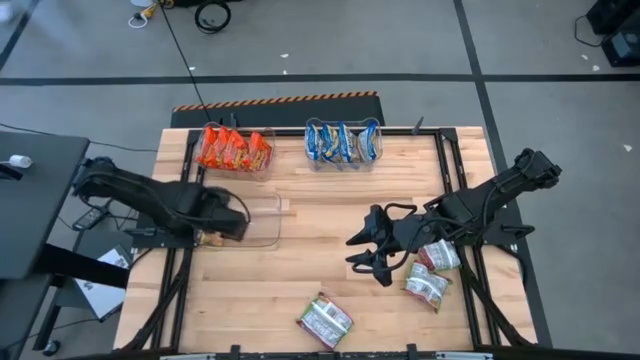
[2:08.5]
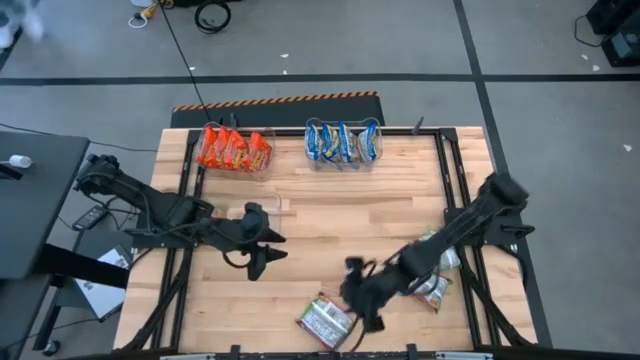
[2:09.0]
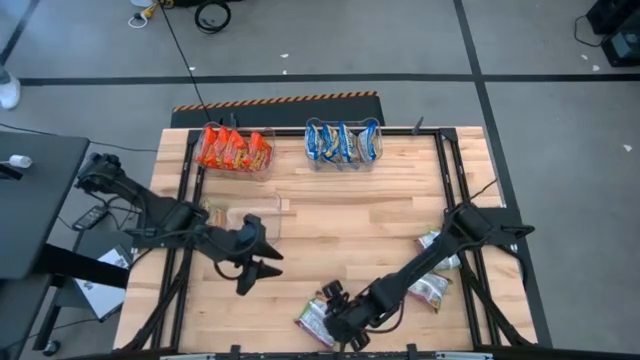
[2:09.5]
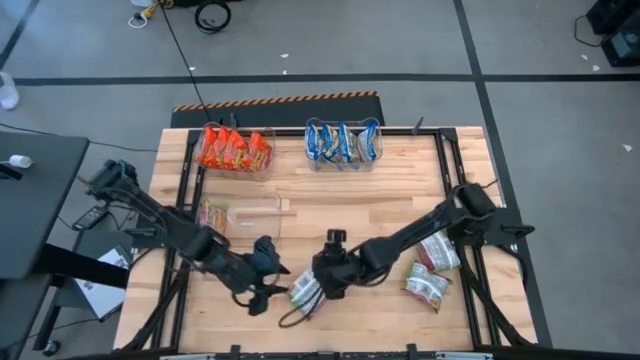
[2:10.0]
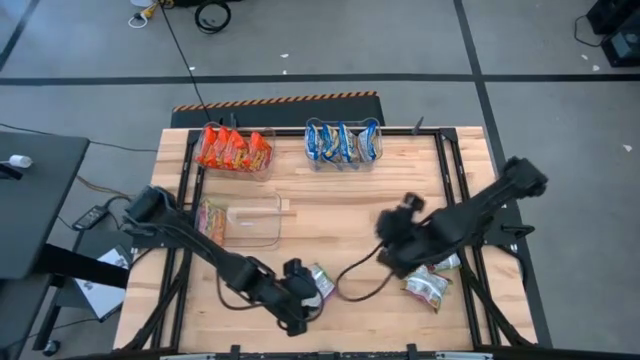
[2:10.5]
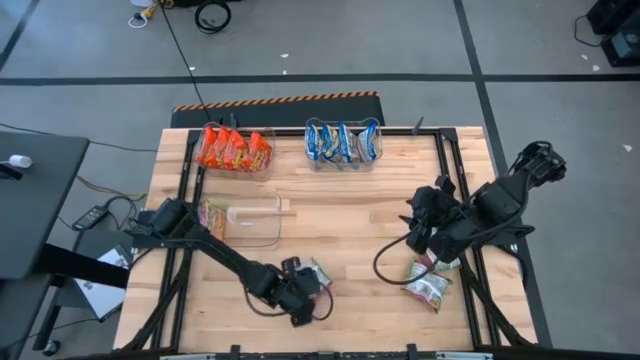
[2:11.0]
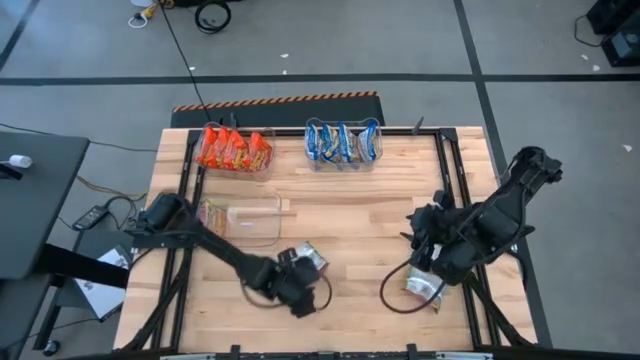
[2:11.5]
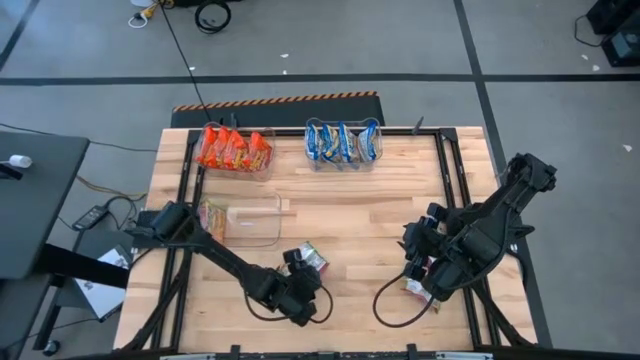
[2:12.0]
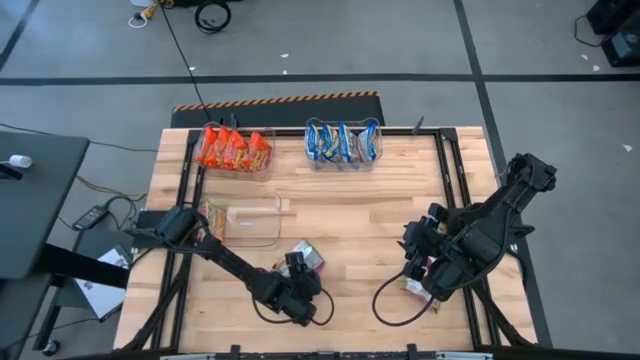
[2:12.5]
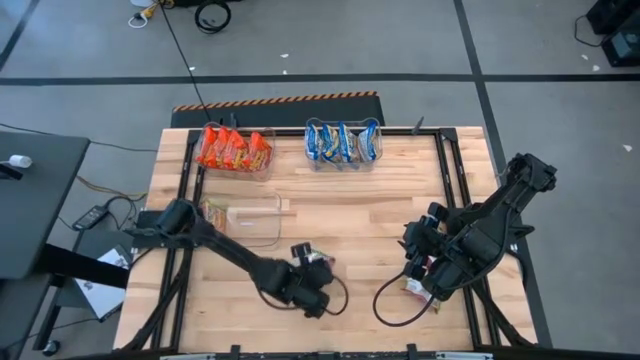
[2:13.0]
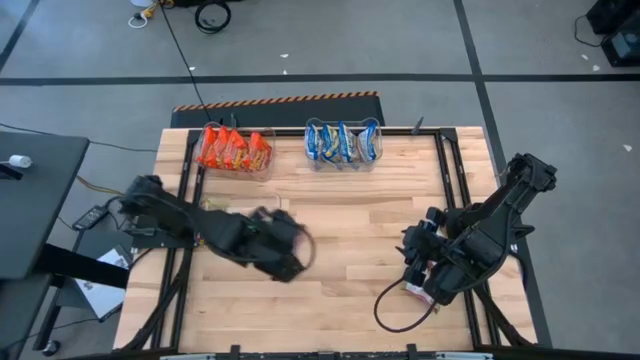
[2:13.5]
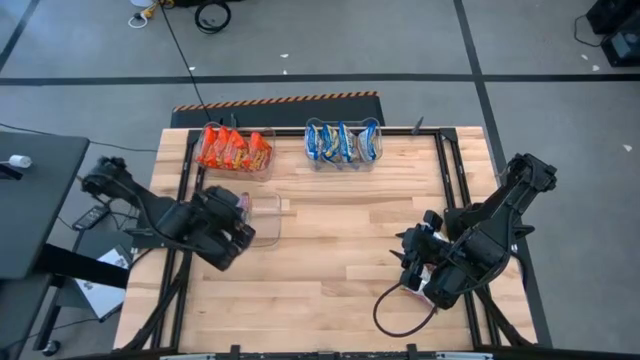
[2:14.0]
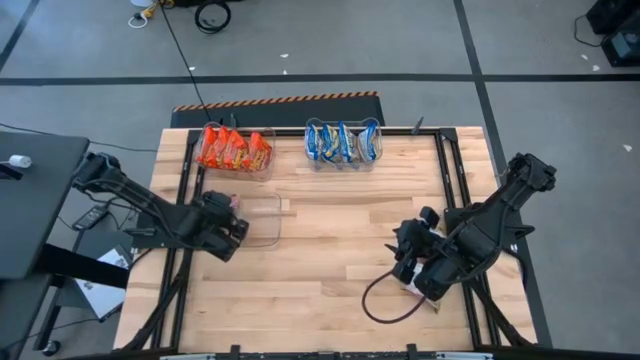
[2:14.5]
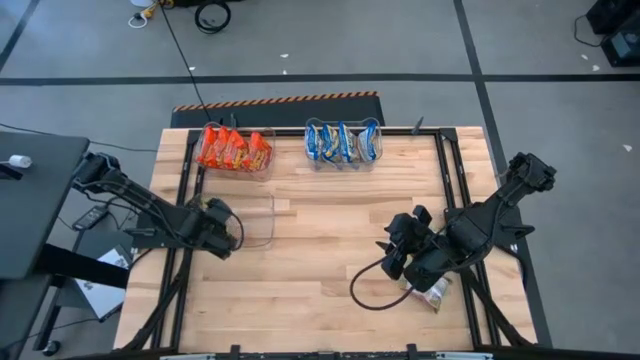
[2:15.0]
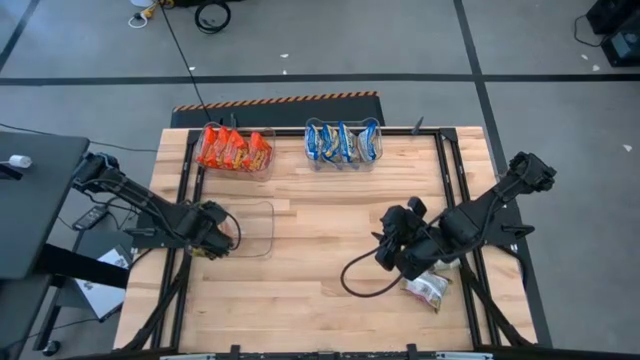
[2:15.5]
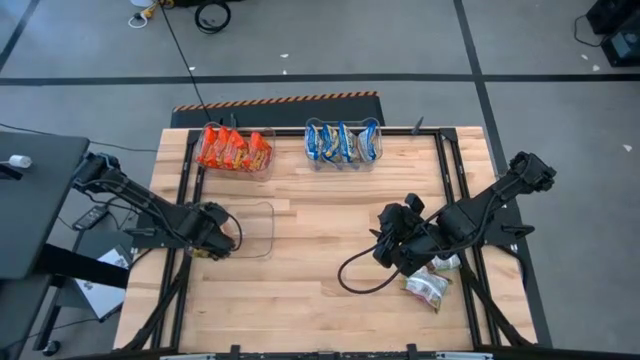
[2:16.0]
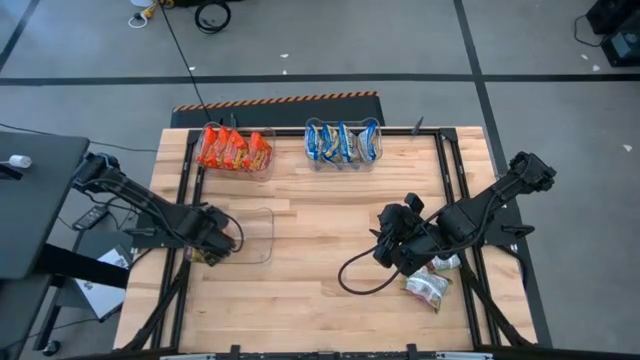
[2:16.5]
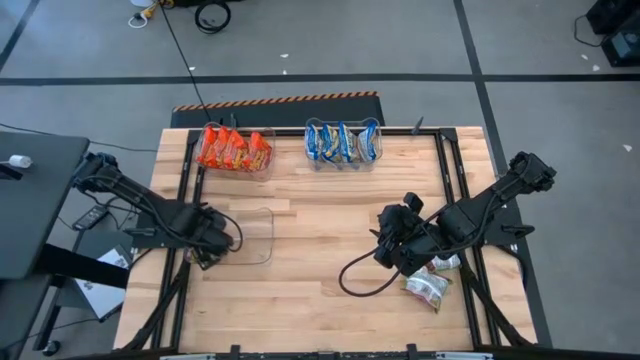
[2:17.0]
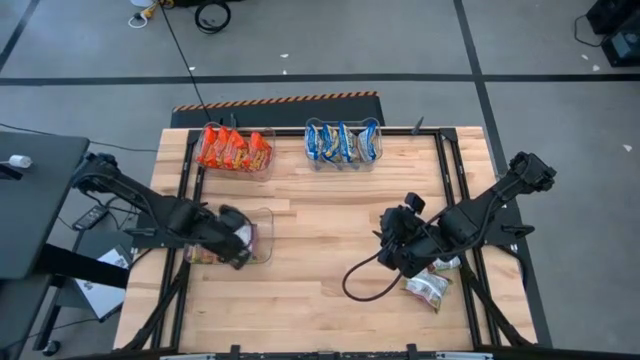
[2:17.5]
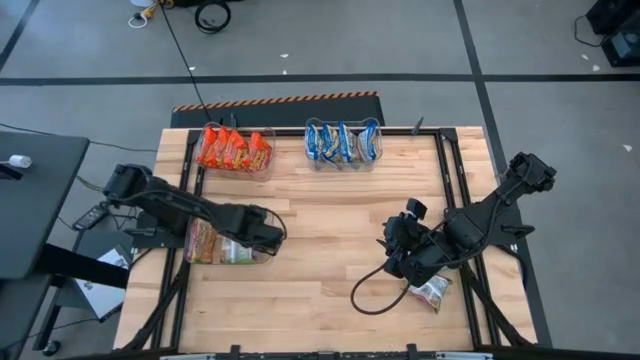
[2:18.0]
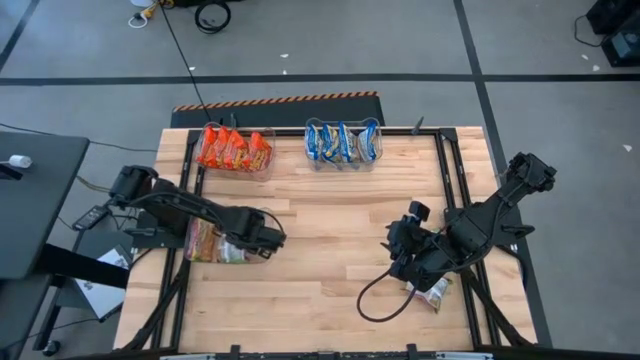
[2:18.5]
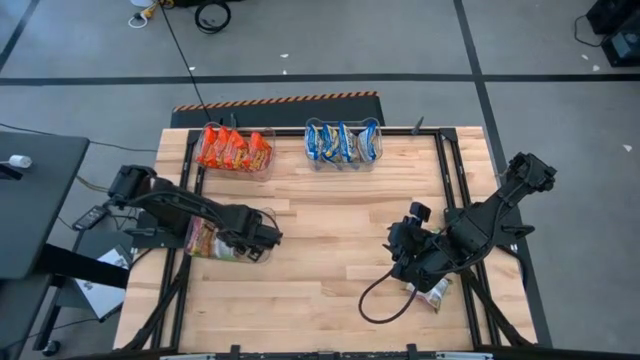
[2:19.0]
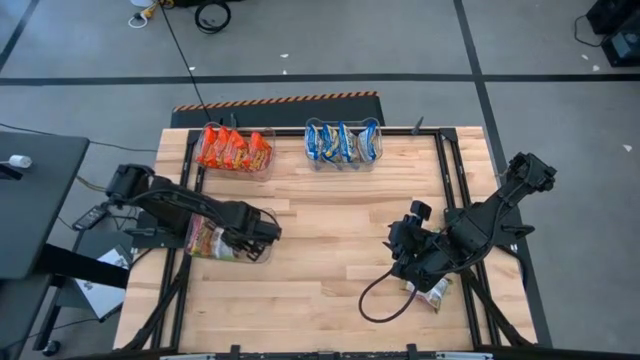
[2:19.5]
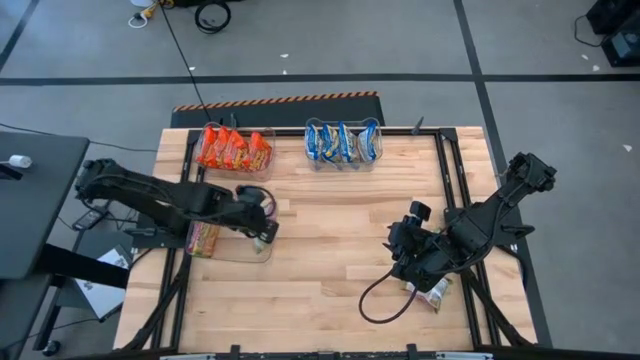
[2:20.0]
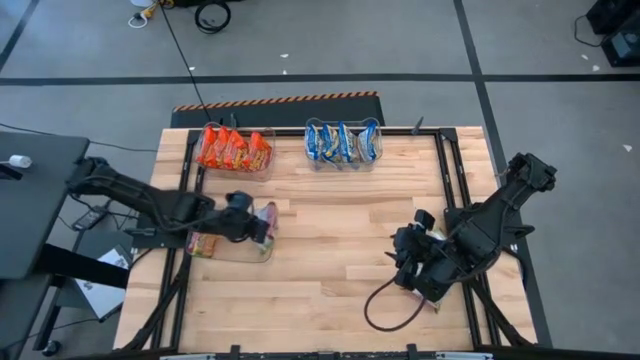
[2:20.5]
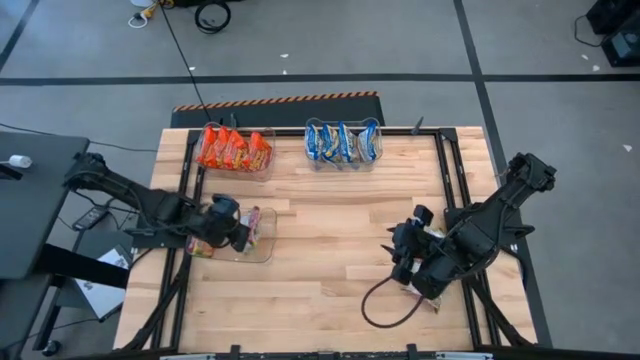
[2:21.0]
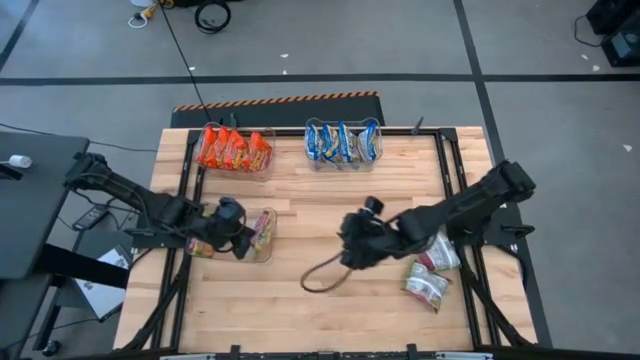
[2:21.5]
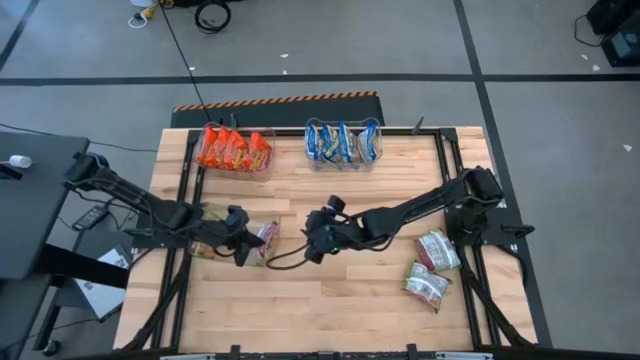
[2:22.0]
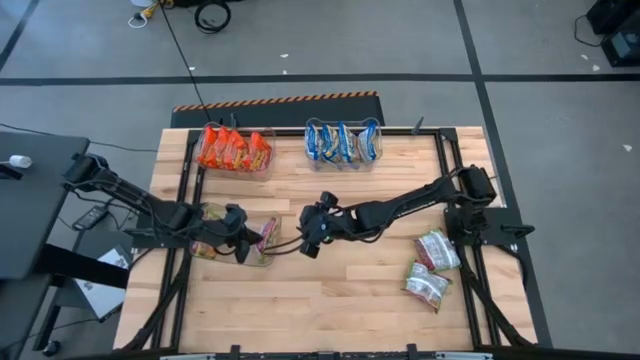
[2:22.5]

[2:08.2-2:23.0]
Task: Sort Maruchan noodles
Put the yellow noodle pack into the bottom transparent bin

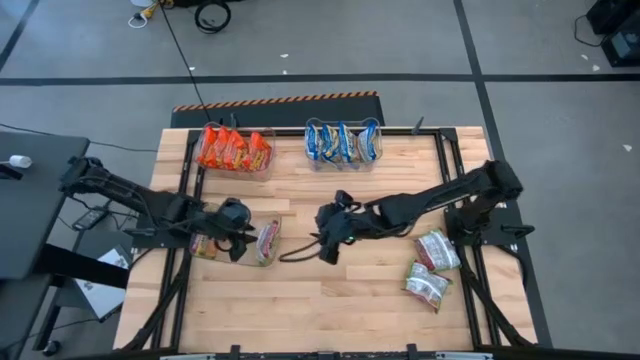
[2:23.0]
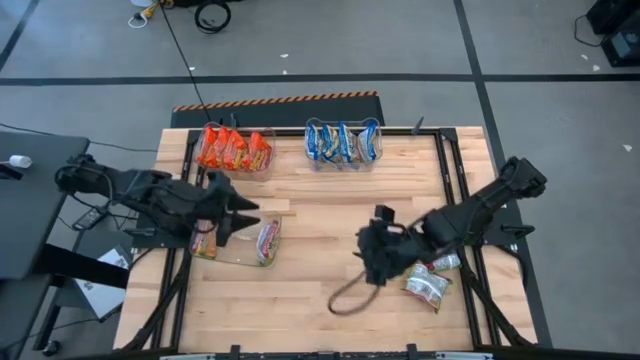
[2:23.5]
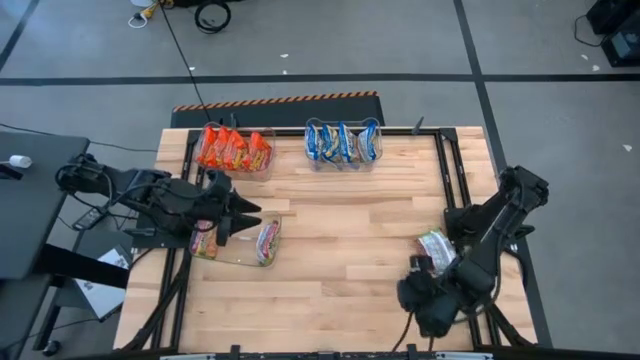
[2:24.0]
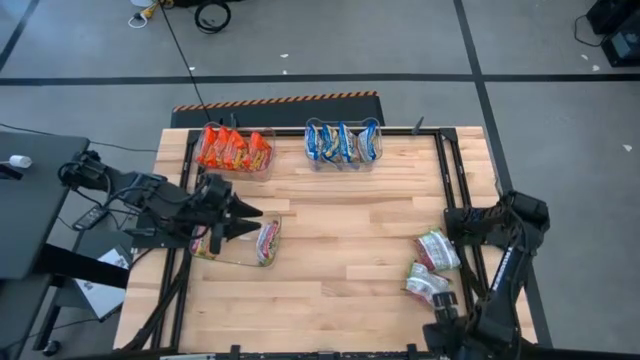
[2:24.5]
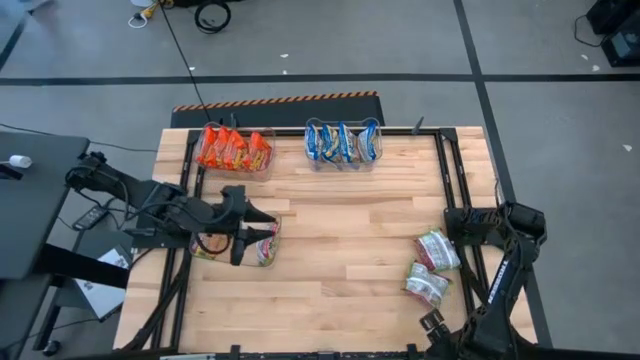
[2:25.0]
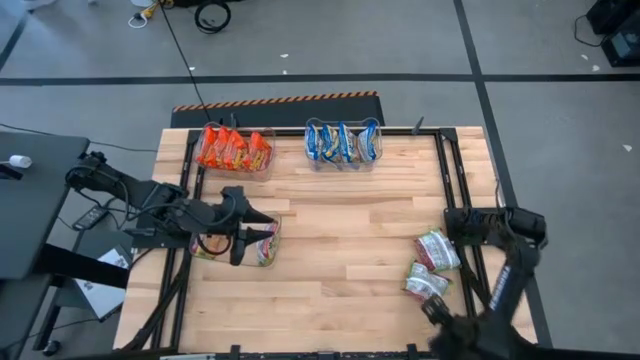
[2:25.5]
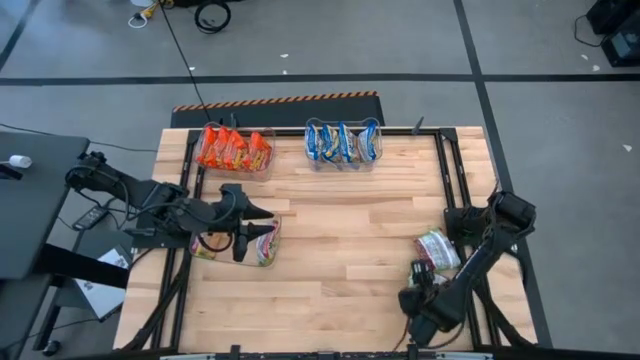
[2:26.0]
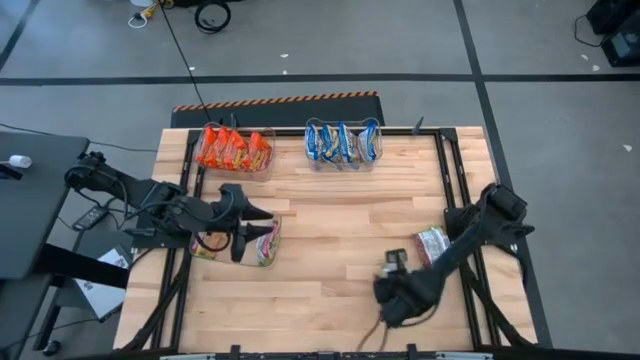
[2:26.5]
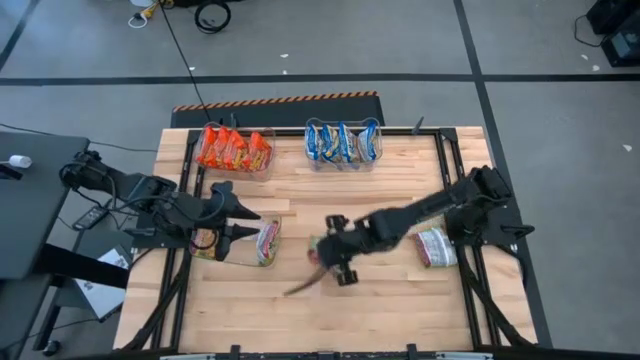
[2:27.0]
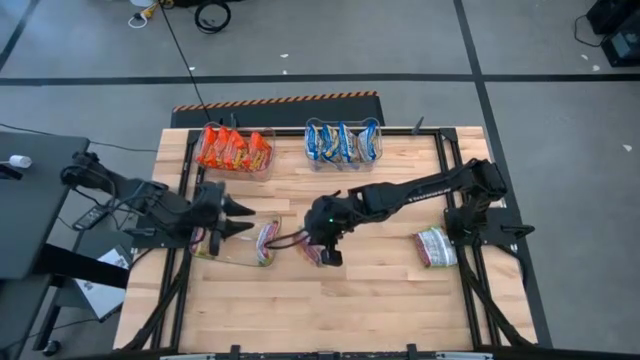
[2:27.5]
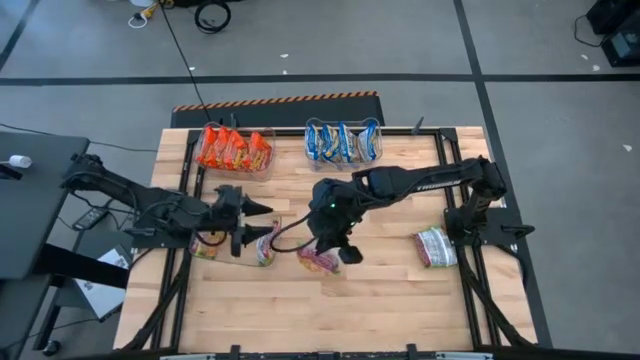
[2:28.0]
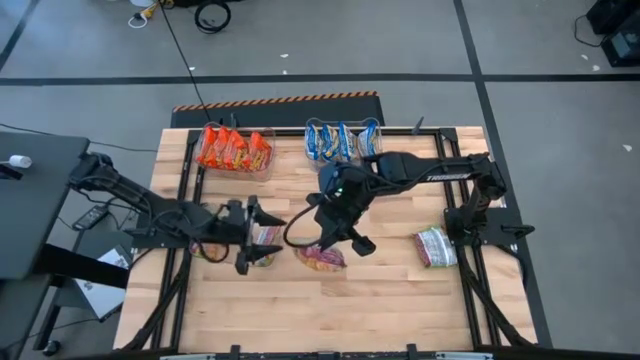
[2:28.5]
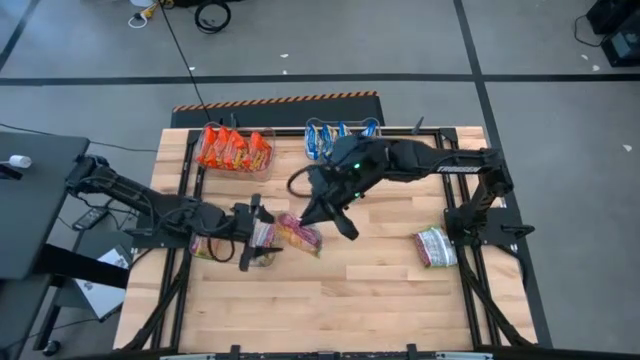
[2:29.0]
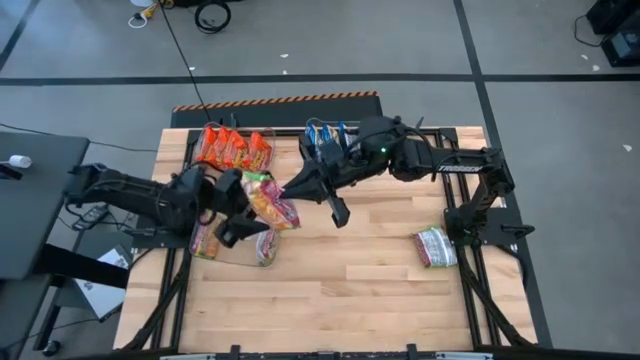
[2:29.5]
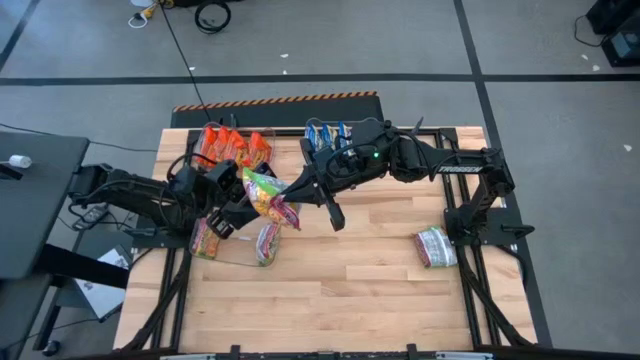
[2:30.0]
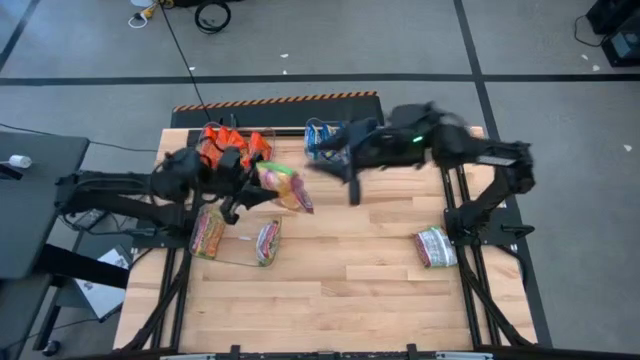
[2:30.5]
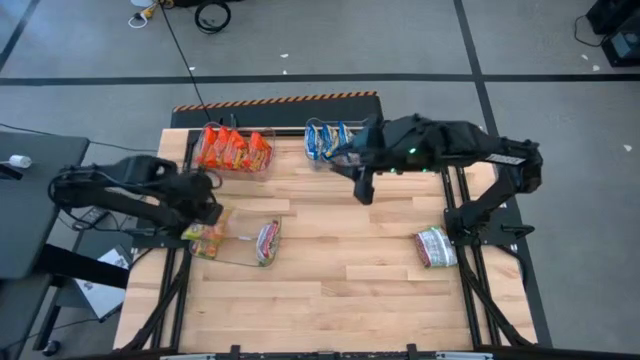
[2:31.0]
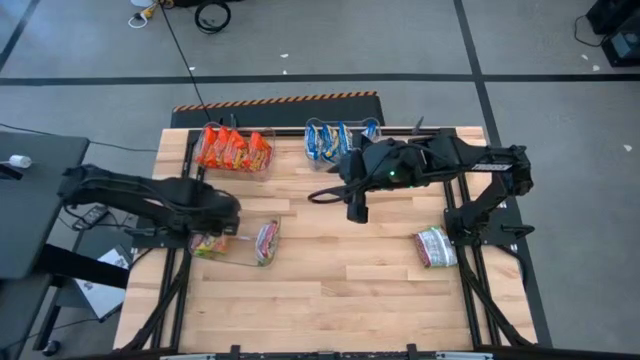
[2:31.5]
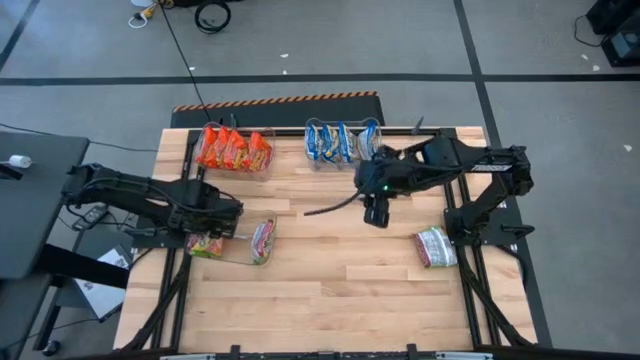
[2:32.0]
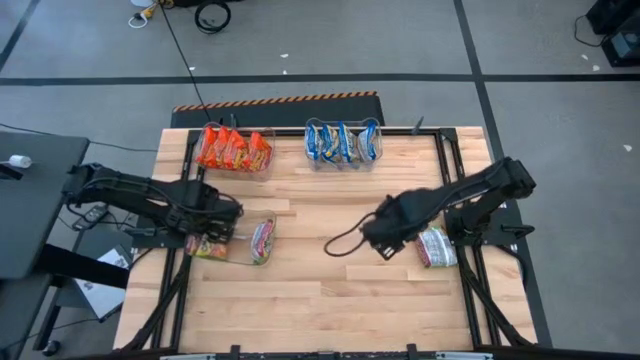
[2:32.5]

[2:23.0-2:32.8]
Put the yellow noodle pack into the bottom transparent bin
